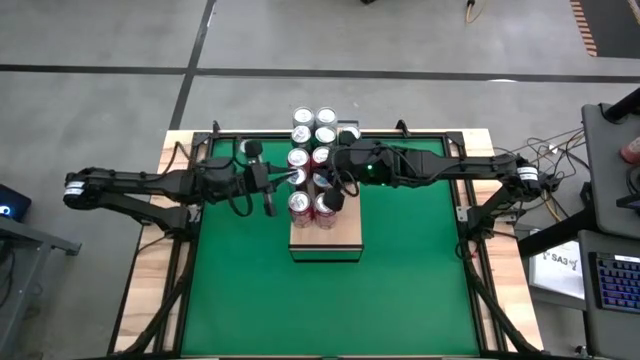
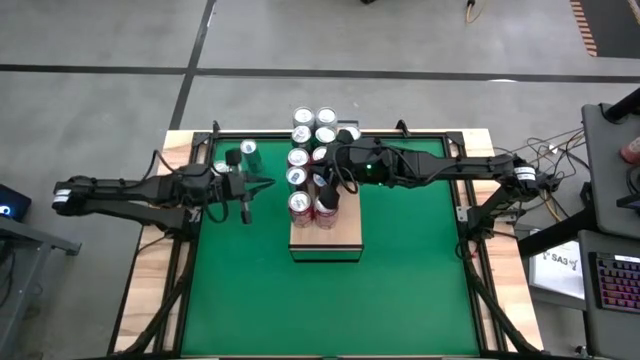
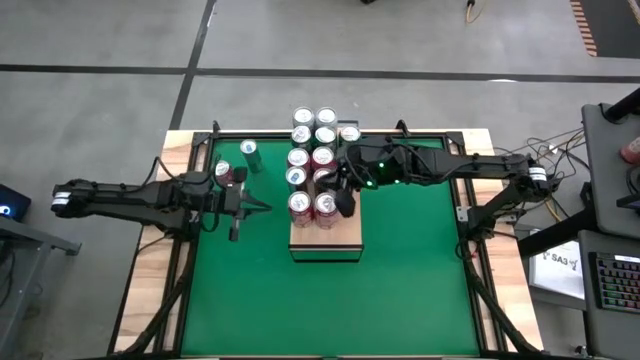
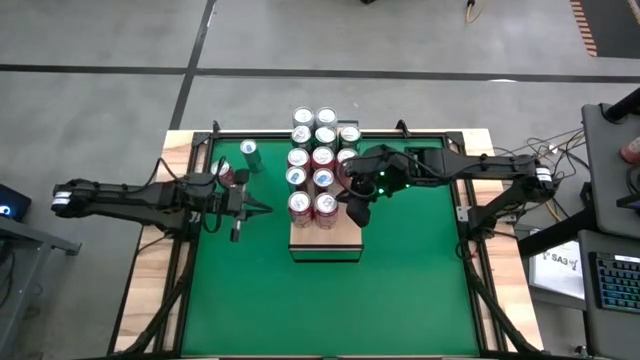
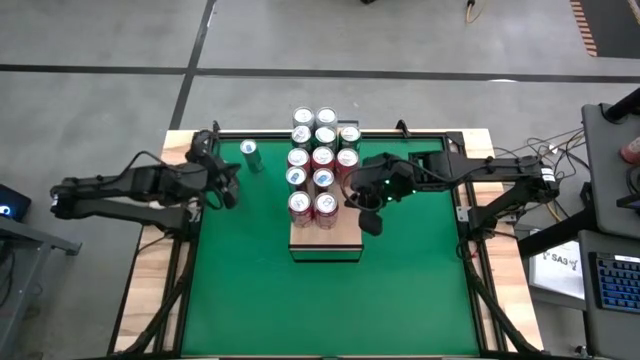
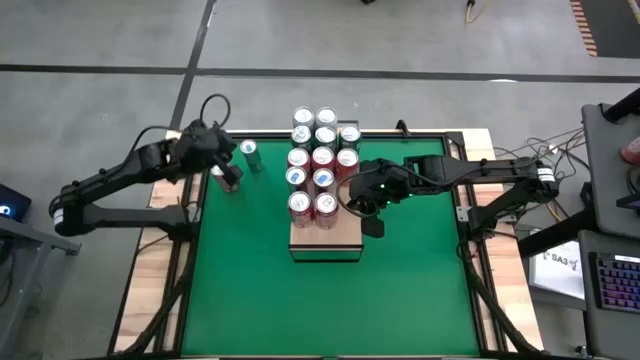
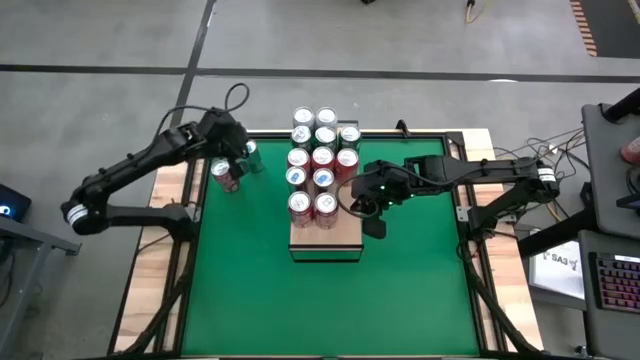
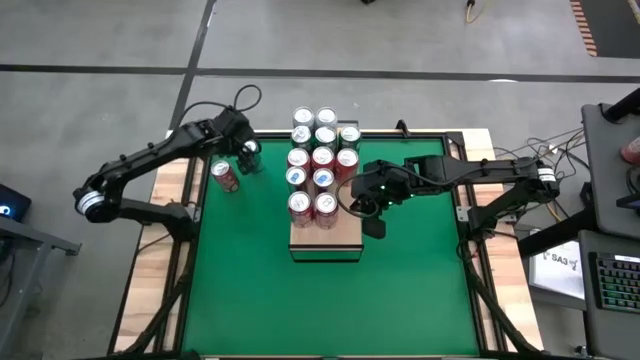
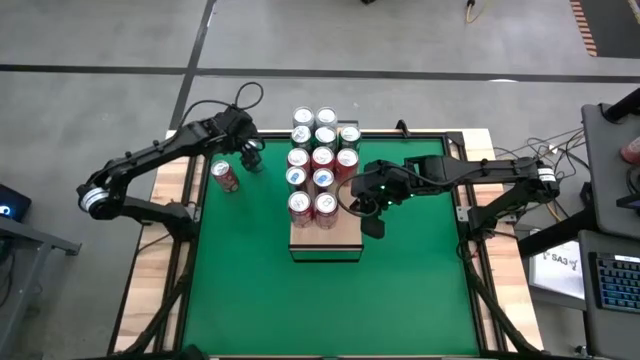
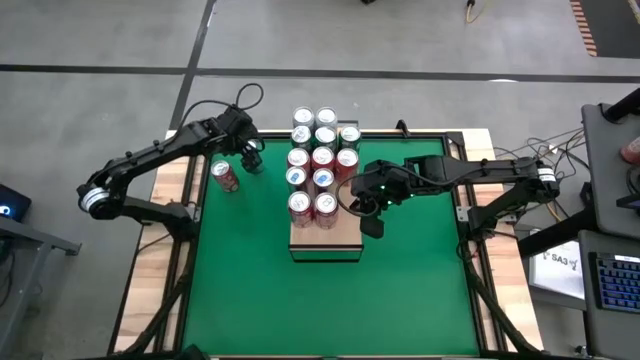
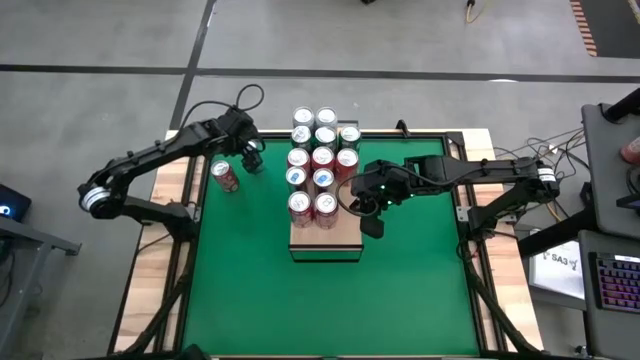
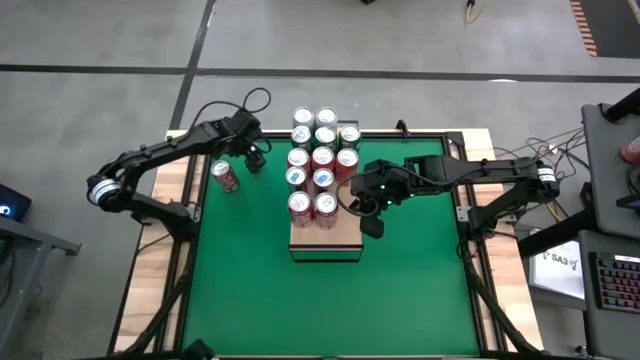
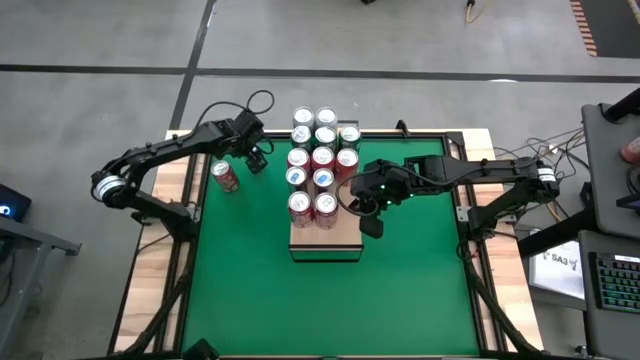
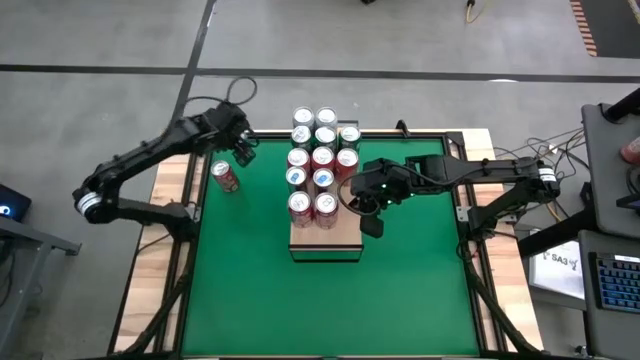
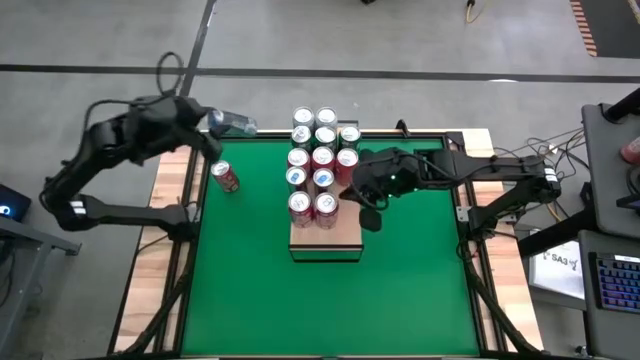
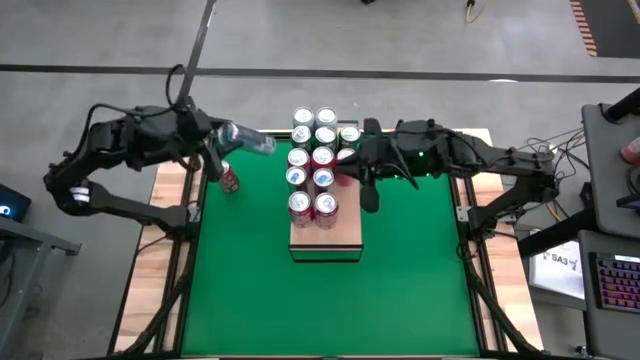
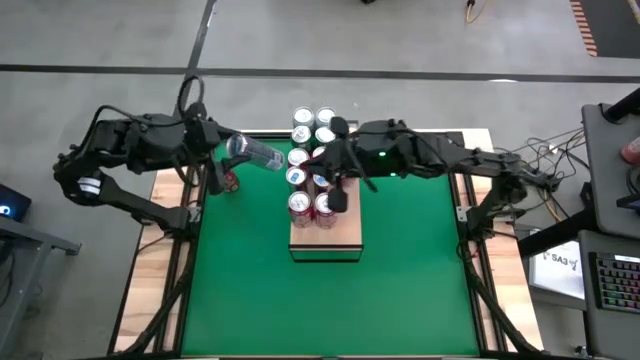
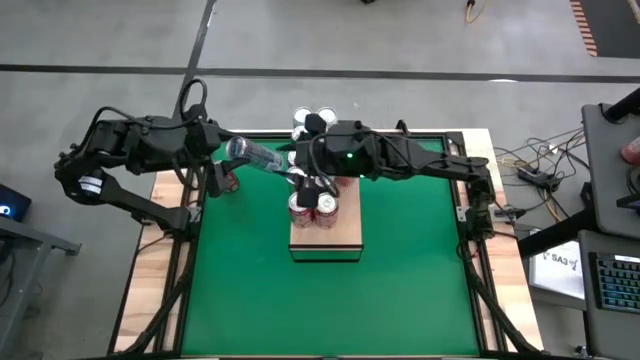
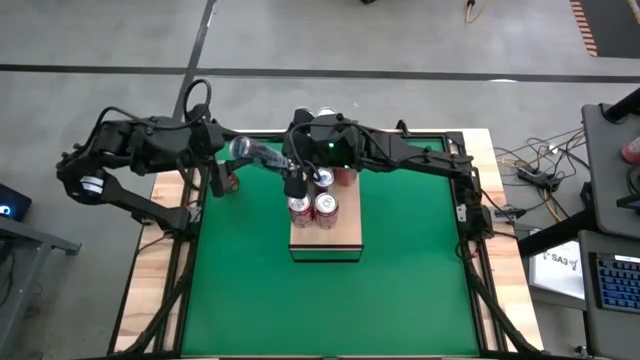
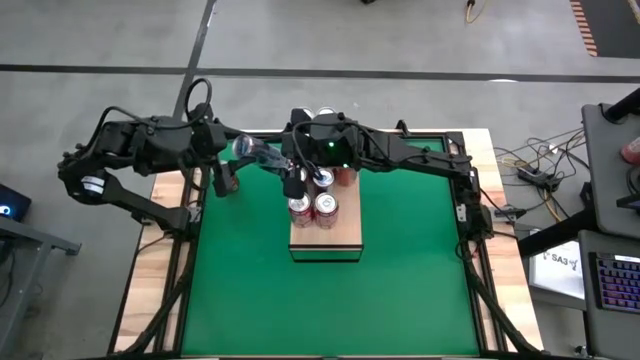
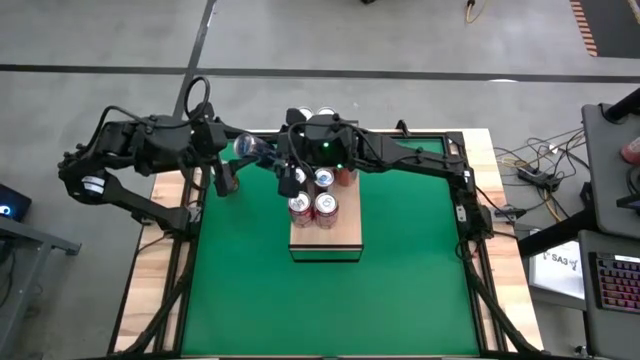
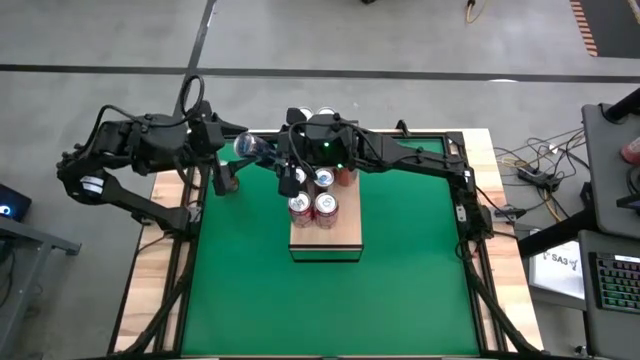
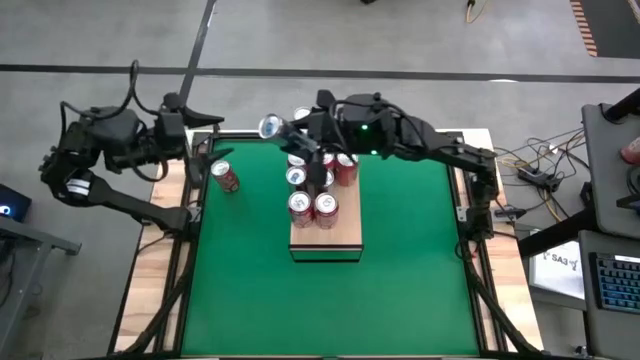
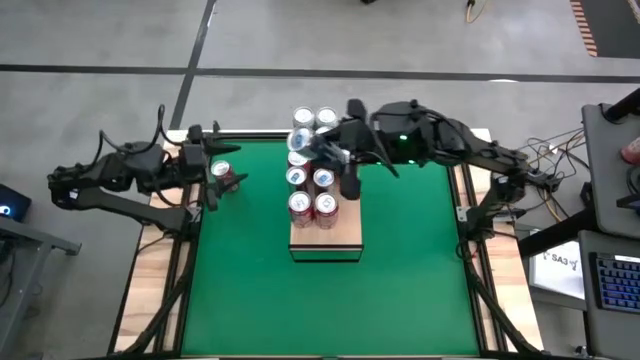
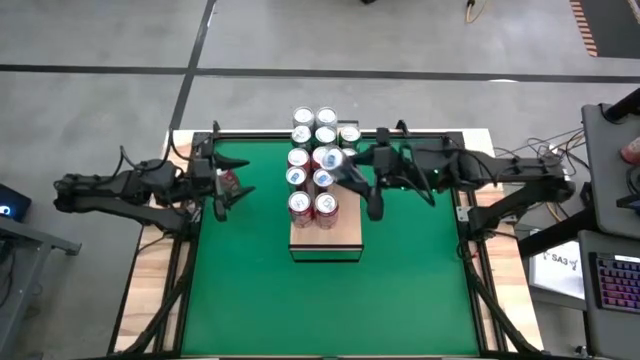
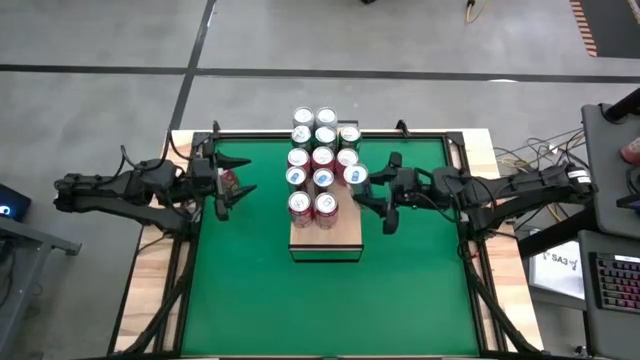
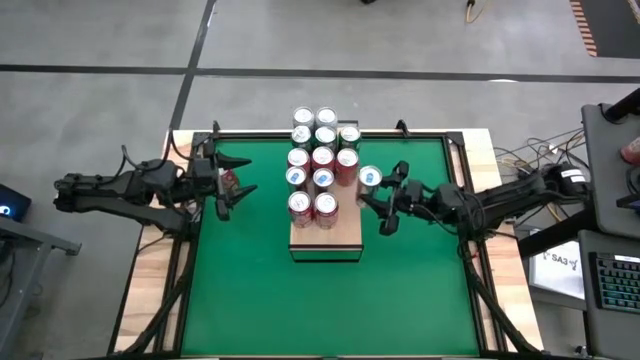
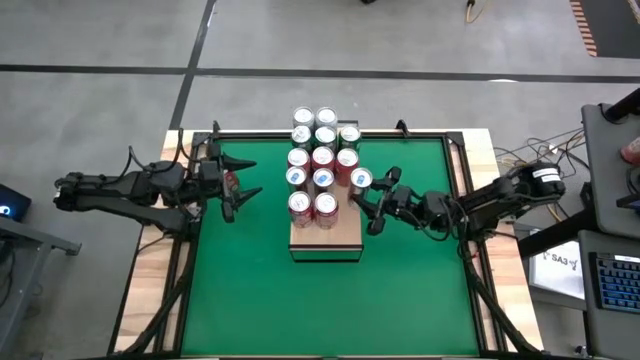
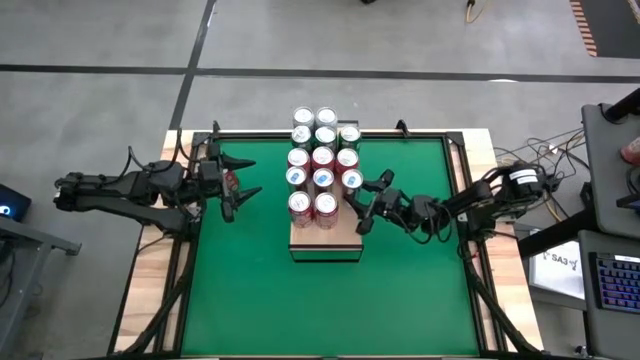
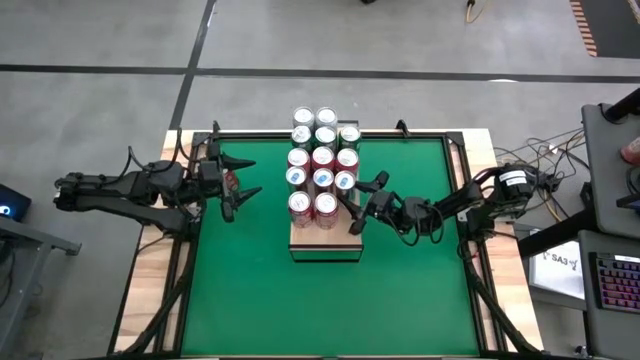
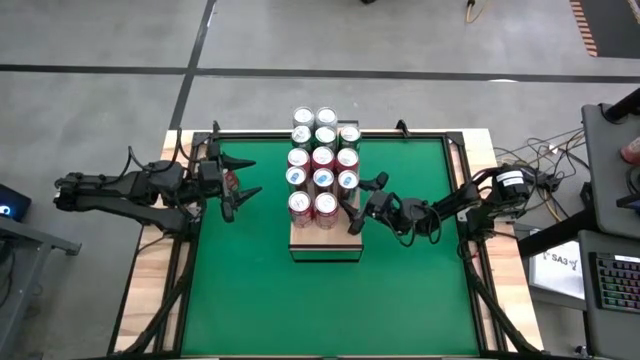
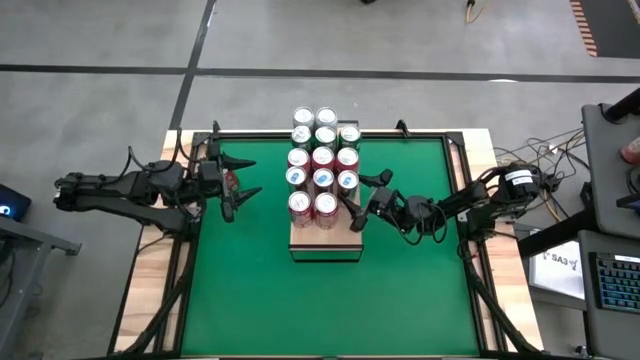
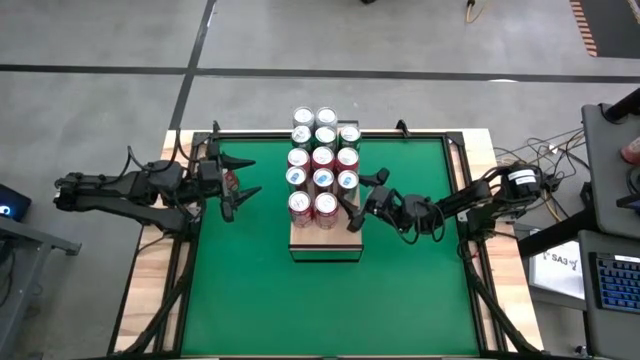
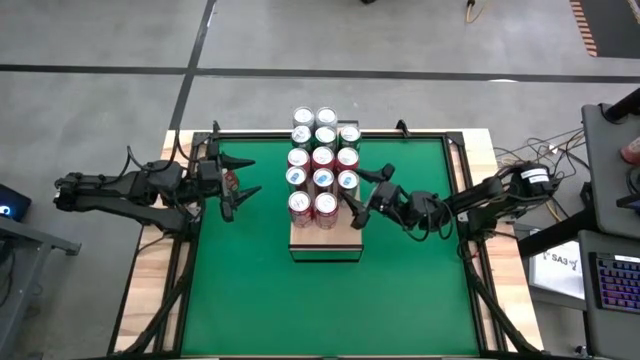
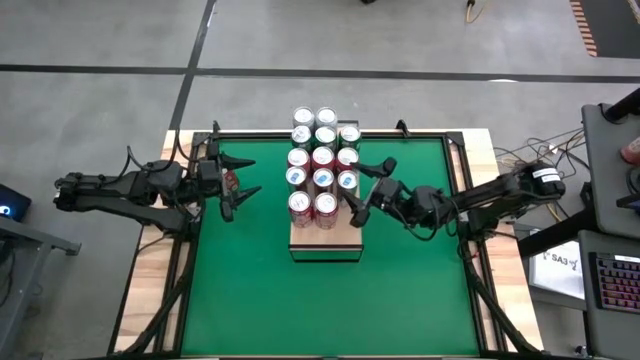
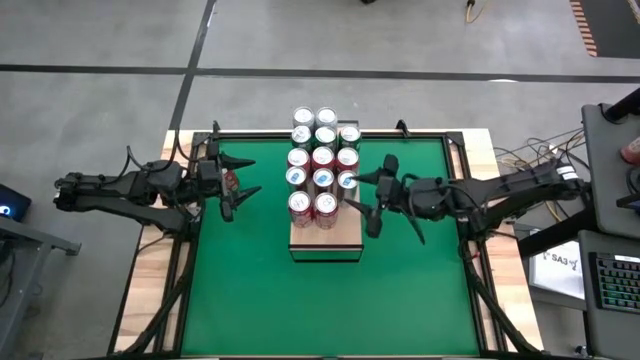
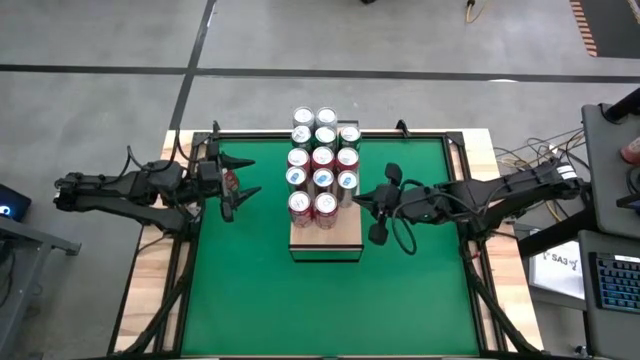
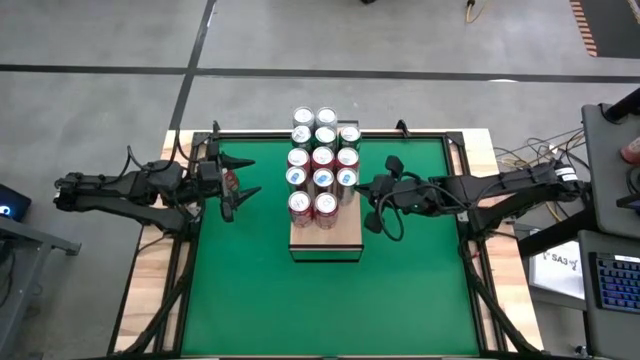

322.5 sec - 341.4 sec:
Task: Place canned beverage on shelf
Put the blue can on the shelf

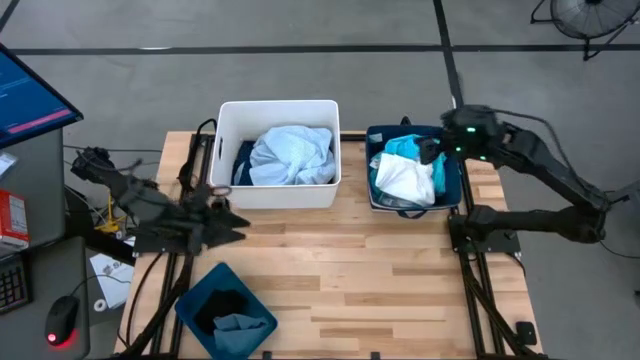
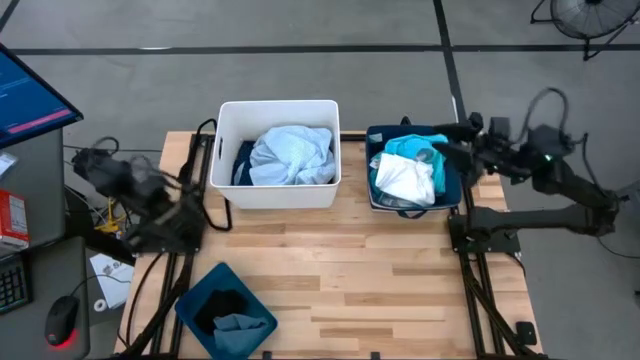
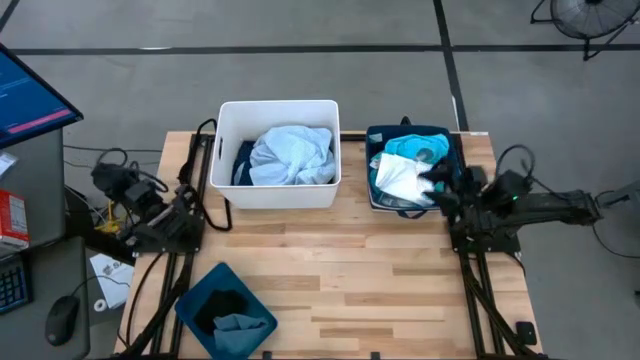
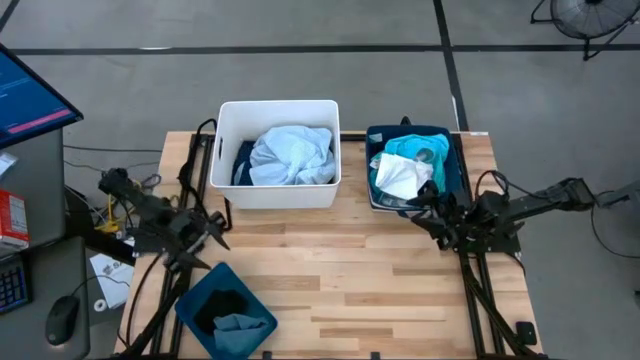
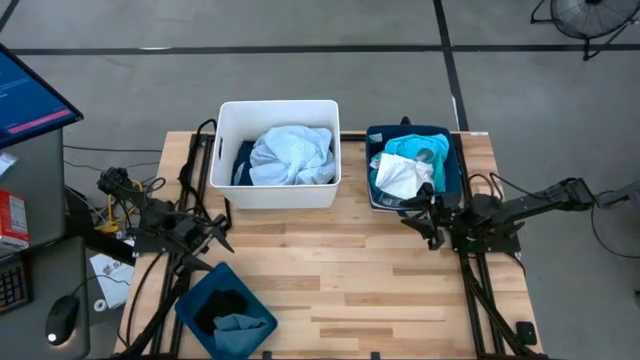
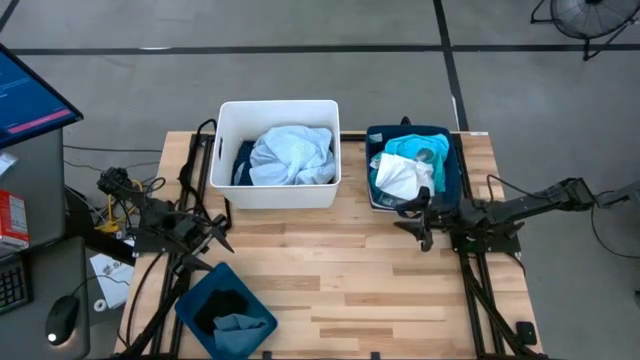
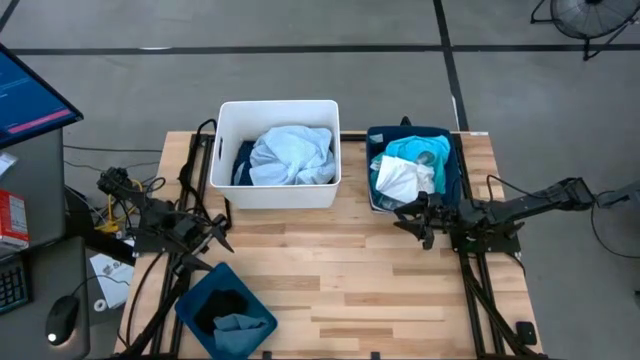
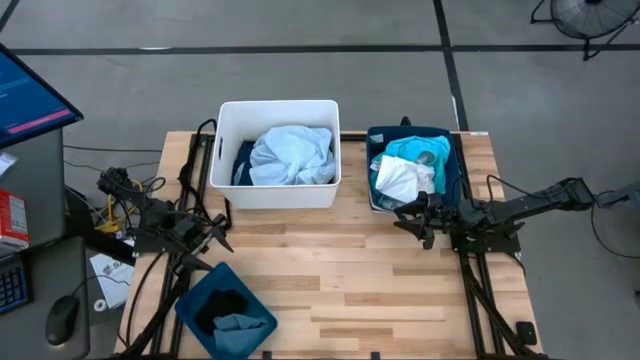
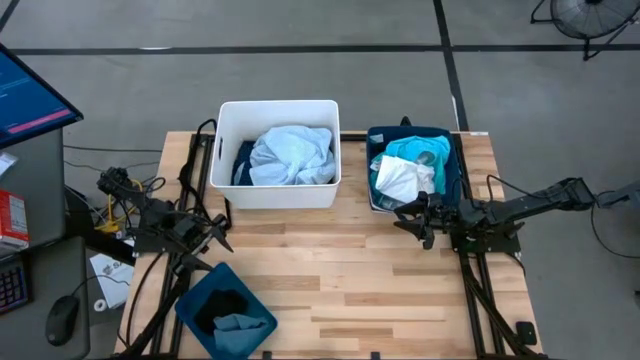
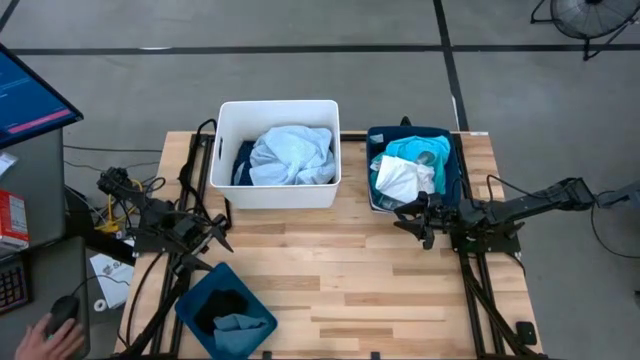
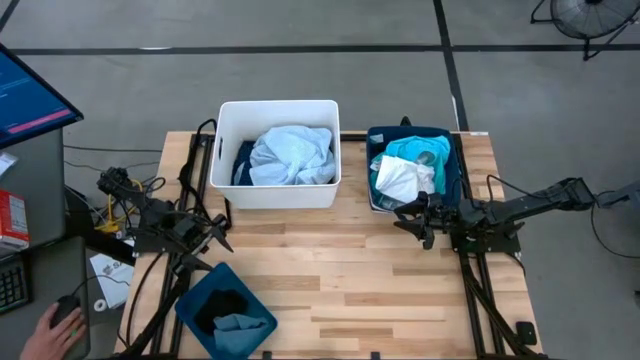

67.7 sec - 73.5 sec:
Task: Pick & Place Cloths
Return to Home Position
